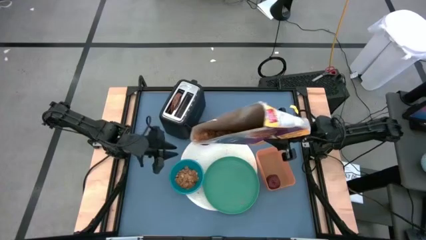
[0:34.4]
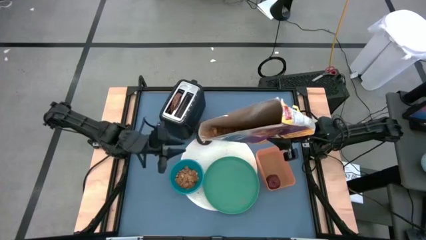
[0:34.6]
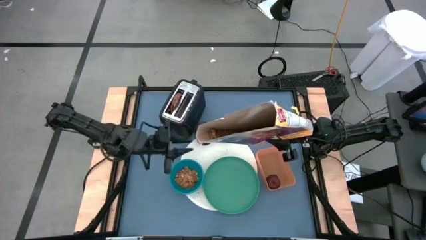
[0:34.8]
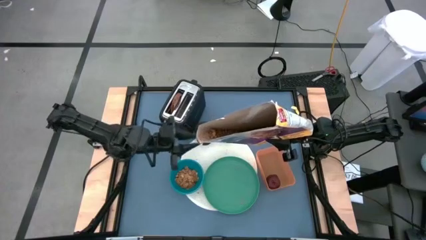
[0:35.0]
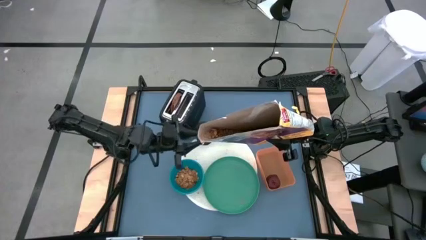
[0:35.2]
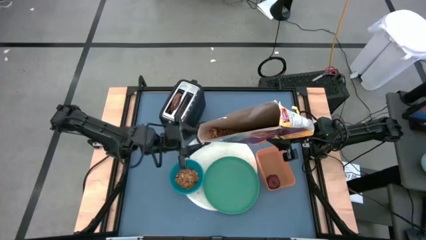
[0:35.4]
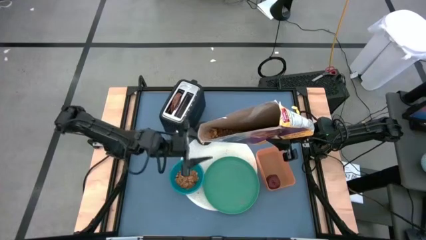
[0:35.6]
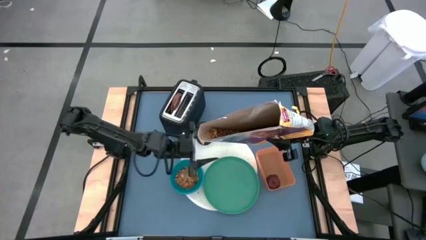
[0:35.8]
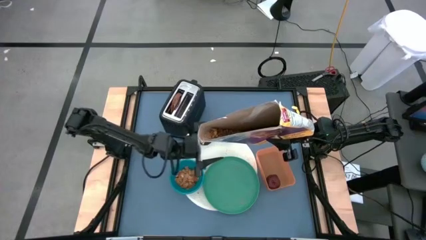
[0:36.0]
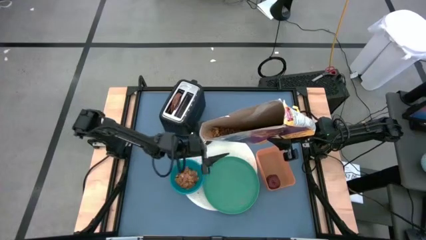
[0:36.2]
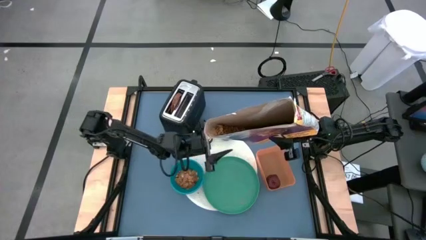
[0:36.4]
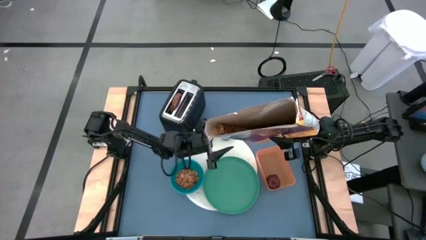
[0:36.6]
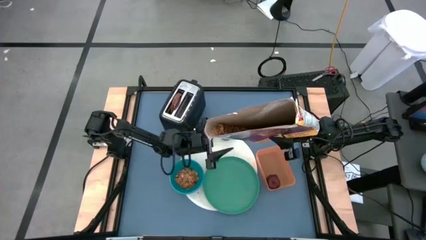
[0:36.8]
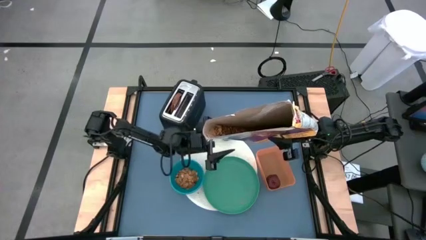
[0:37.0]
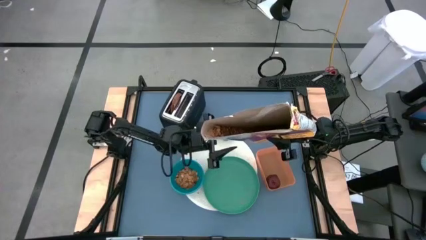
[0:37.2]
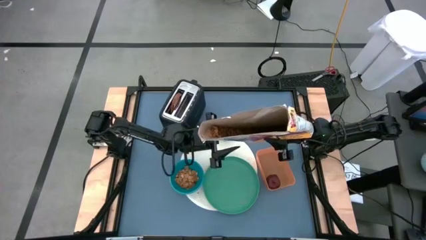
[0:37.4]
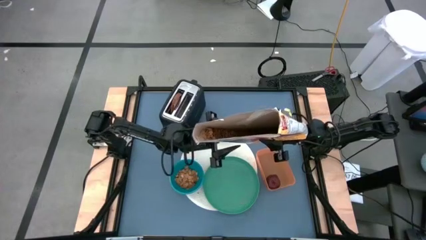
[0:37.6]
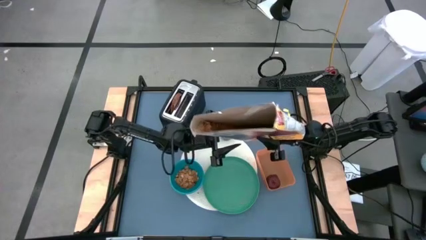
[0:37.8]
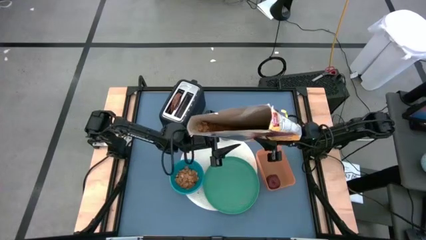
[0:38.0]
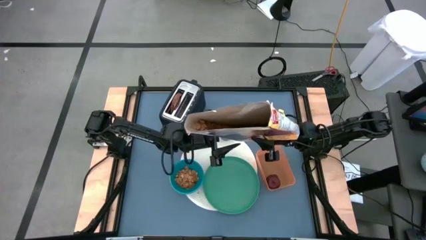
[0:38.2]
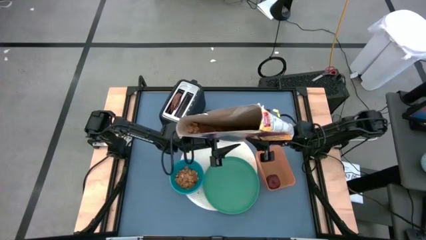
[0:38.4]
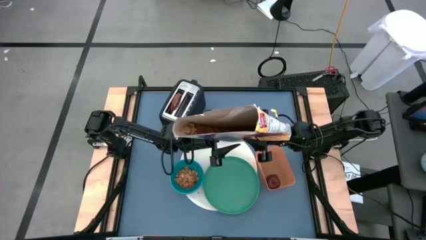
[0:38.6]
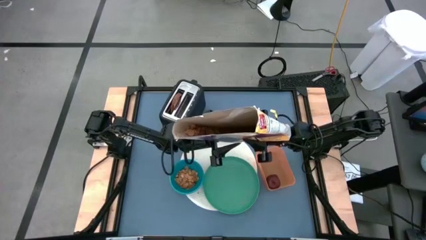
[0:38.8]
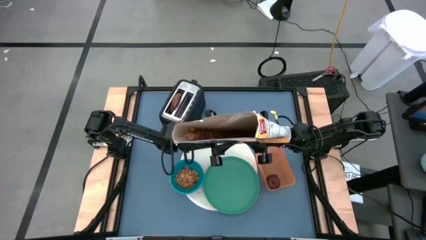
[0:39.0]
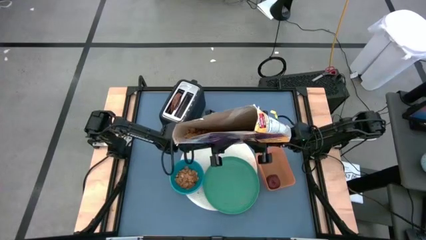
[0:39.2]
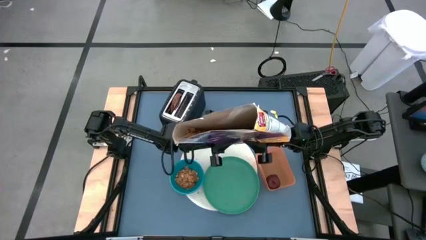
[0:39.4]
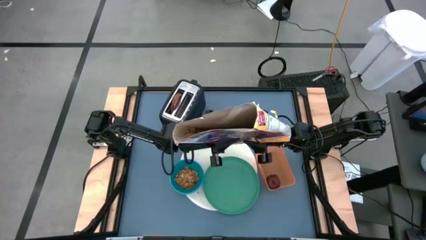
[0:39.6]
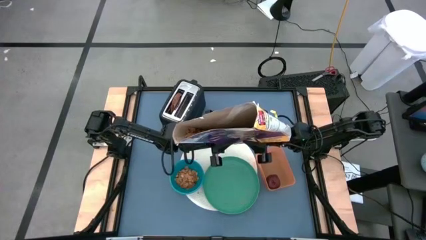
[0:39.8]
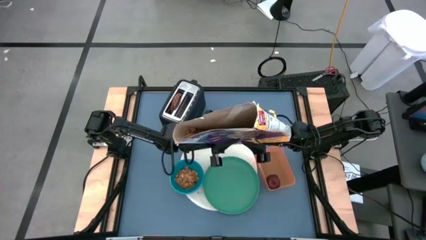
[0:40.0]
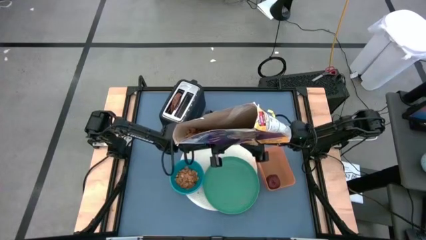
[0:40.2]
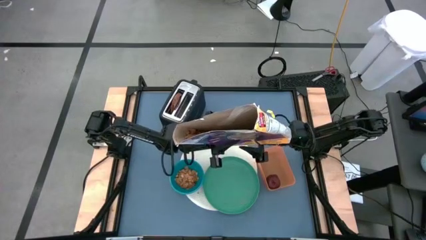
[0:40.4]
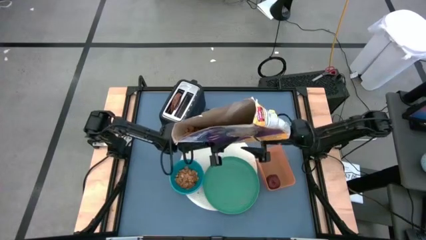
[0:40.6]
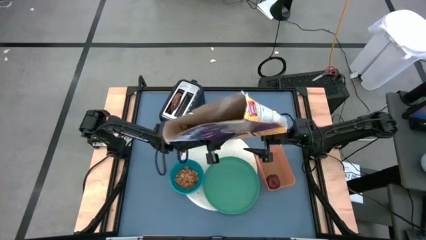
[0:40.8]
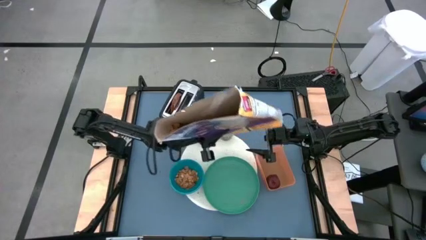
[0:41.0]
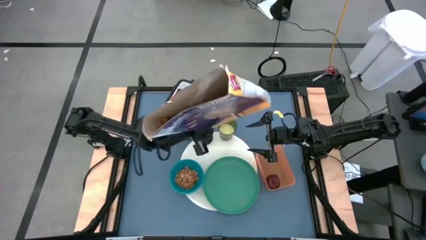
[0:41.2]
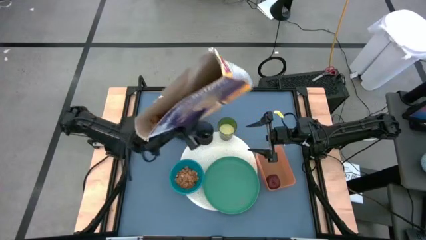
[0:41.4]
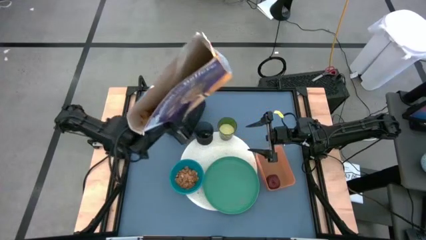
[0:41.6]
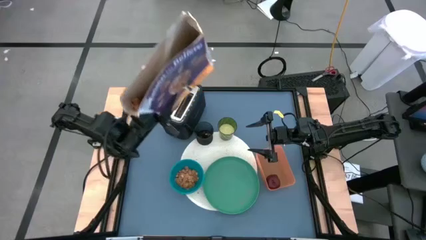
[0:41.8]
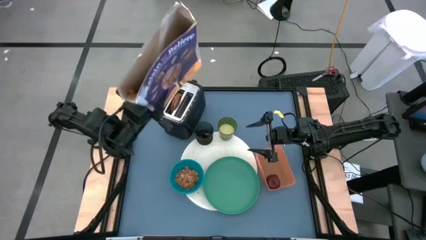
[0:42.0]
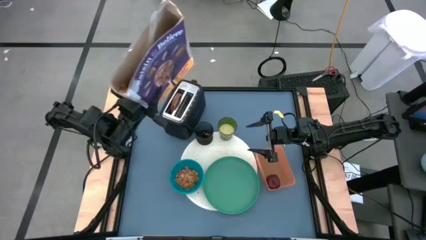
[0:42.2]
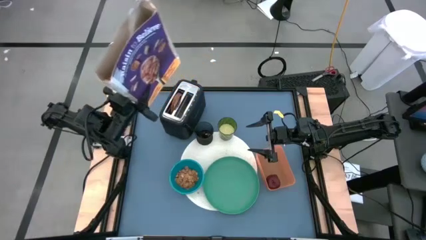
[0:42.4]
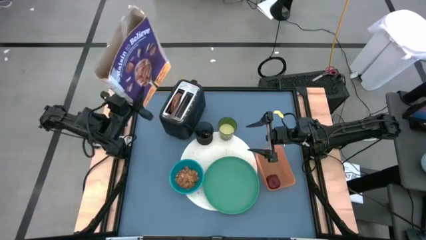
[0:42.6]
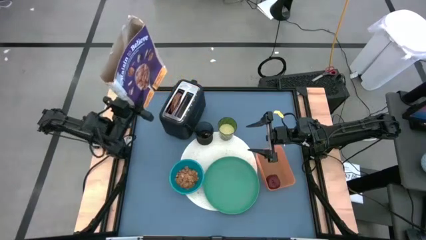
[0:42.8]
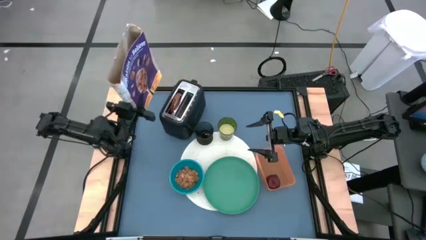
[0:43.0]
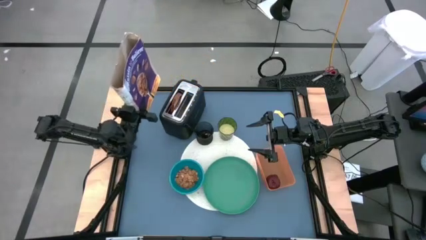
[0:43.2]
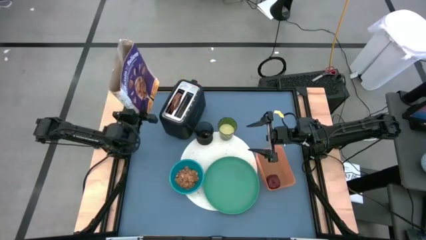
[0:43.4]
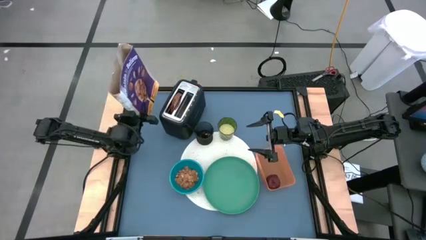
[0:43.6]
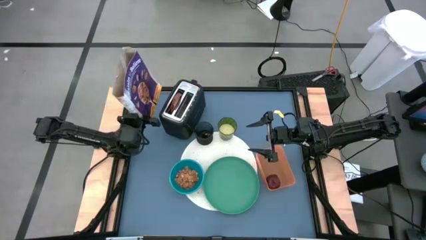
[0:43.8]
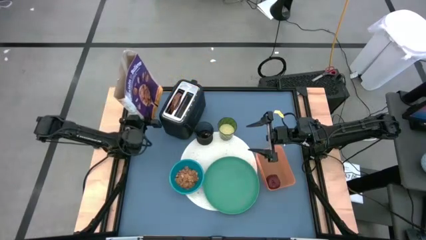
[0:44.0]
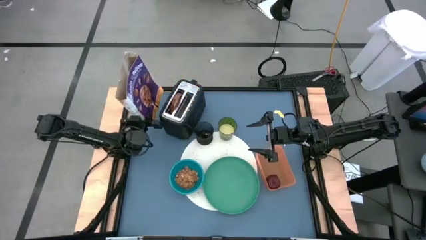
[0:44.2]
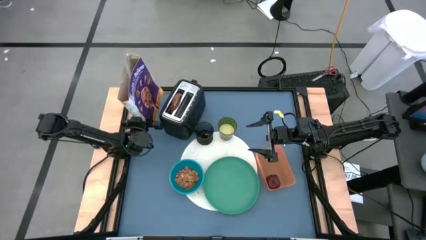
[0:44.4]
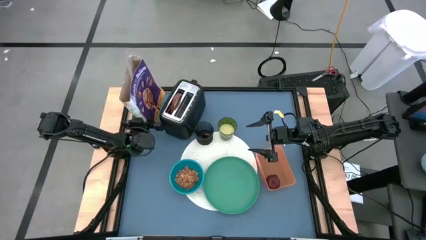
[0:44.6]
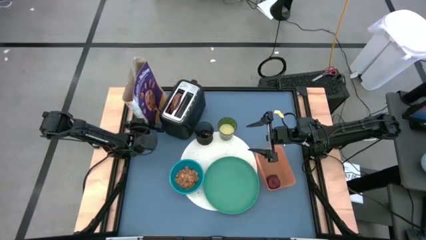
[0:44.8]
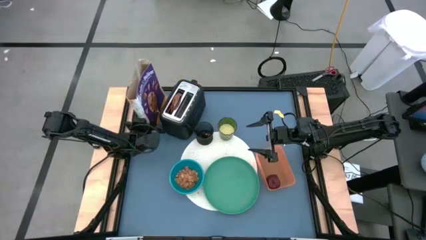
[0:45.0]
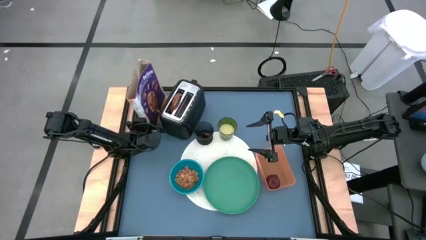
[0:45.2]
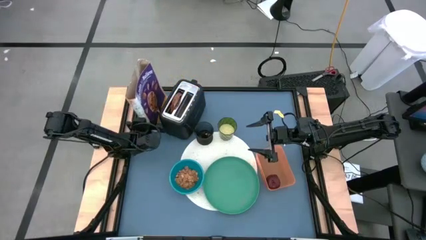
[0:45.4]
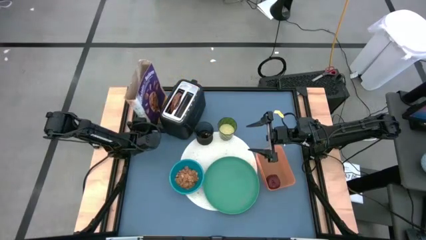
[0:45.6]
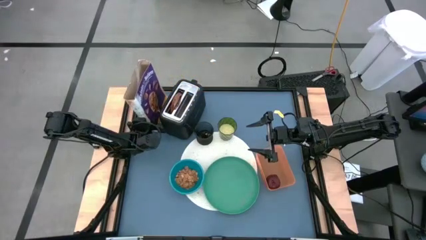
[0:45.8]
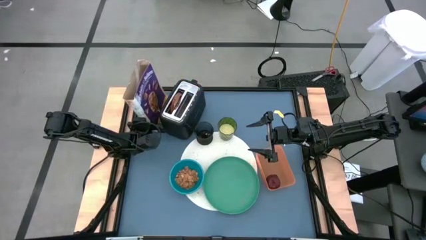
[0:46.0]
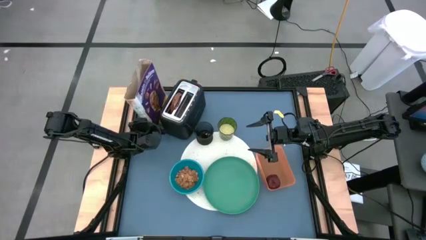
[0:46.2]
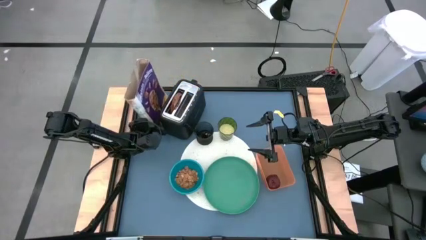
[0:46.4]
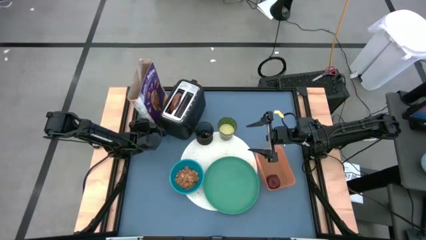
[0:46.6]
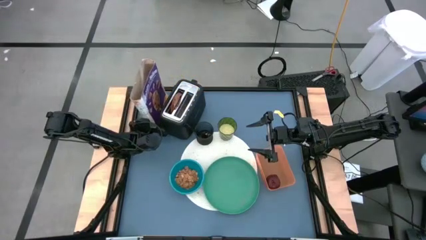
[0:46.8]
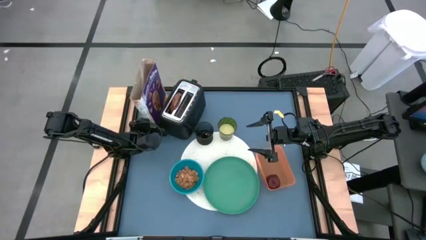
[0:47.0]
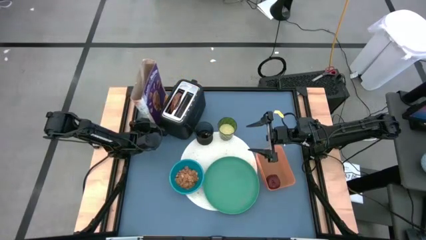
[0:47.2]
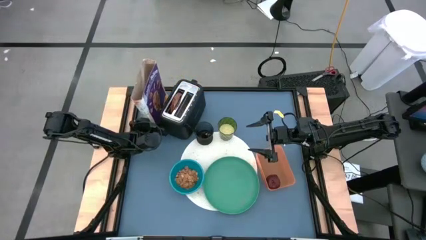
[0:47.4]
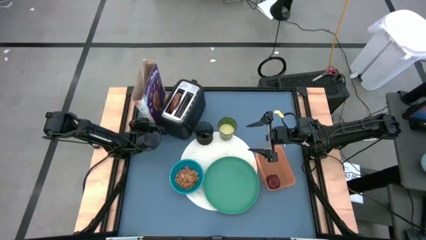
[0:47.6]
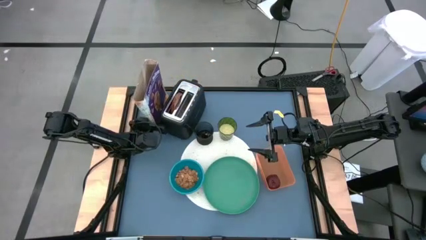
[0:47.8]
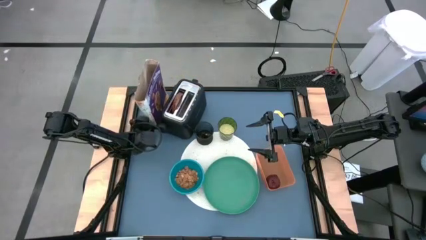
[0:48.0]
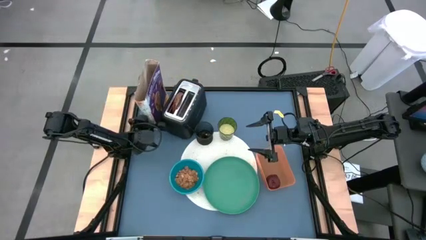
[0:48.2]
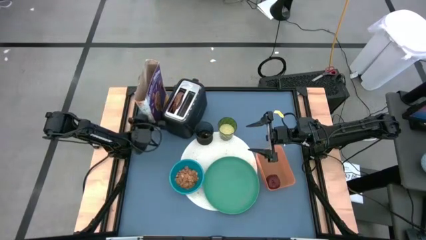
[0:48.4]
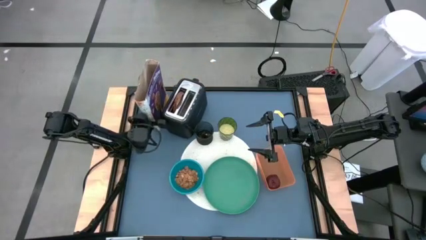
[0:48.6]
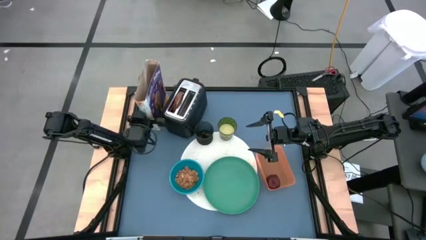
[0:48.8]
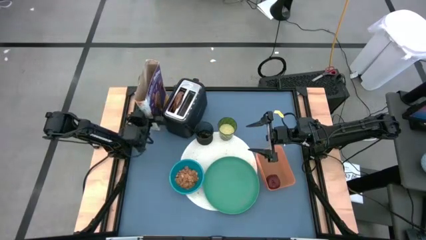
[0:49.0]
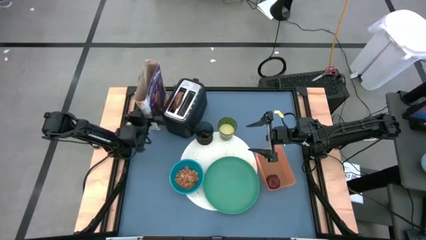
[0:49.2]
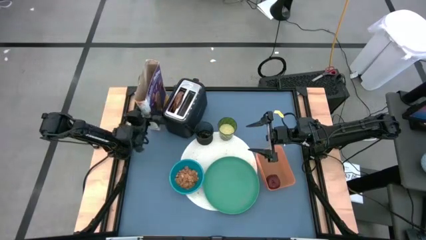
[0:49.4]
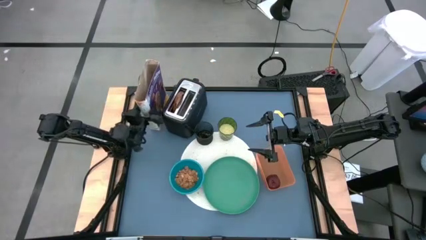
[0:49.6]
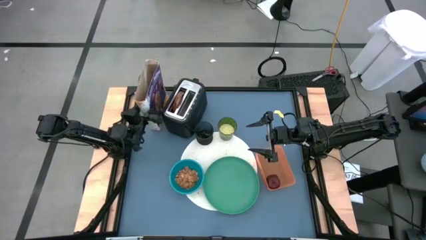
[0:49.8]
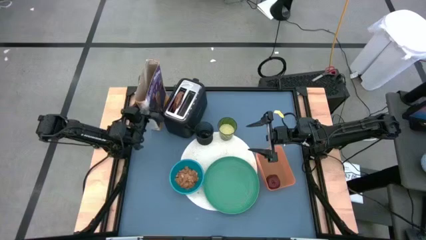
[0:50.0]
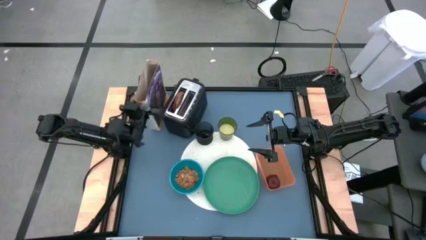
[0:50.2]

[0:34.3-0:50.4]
Task: Arrange a breakfast setting
Pour the cereal from the purple cereal box into the blue bowl
